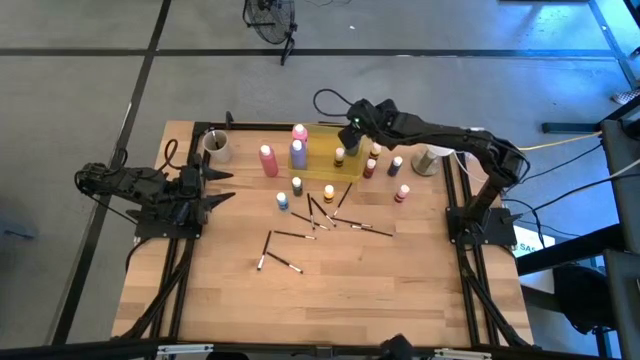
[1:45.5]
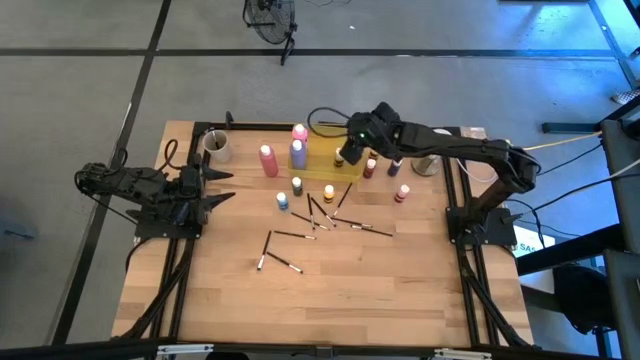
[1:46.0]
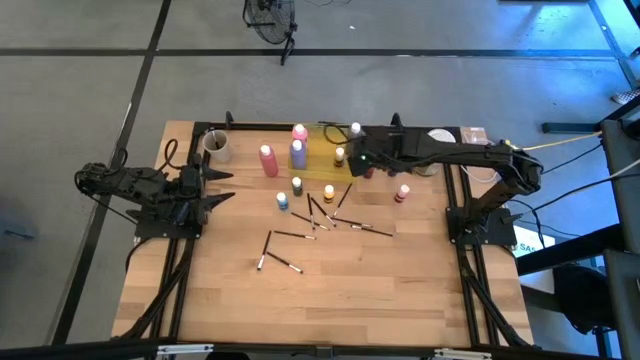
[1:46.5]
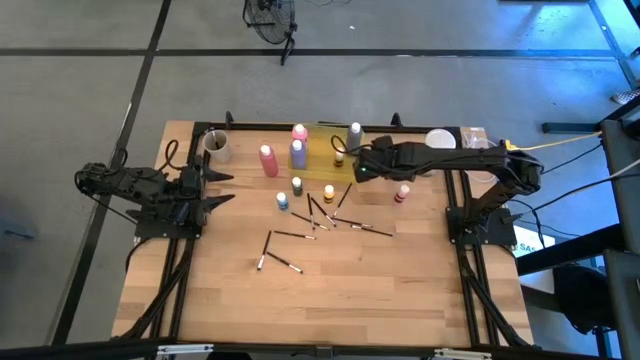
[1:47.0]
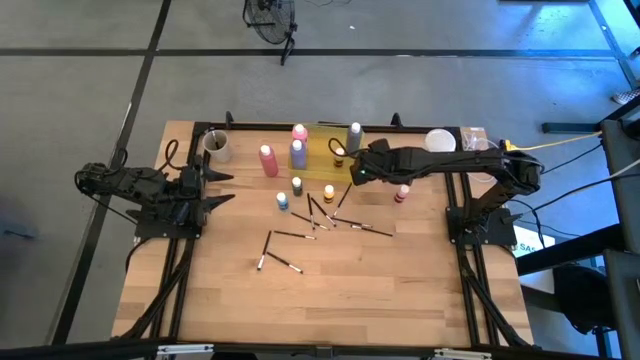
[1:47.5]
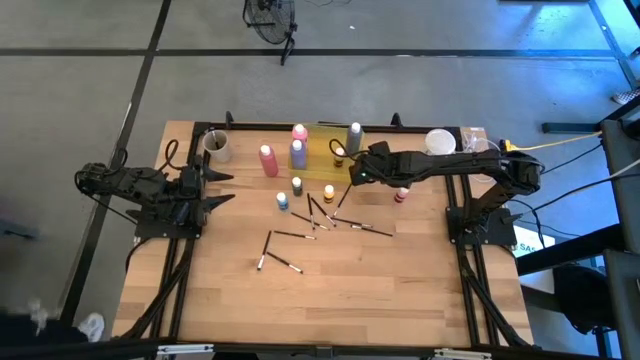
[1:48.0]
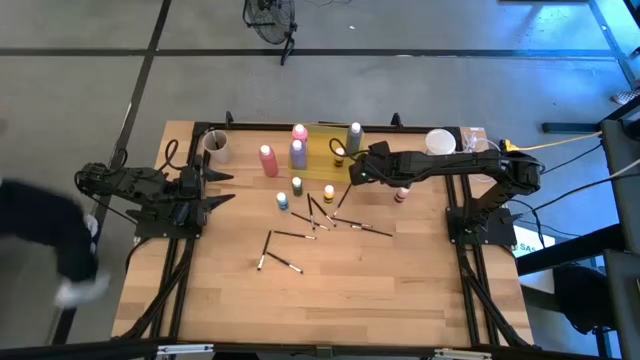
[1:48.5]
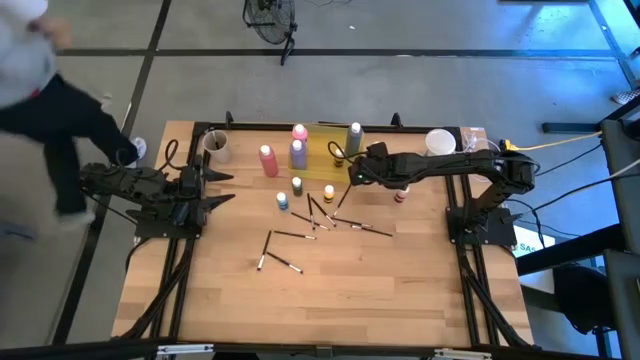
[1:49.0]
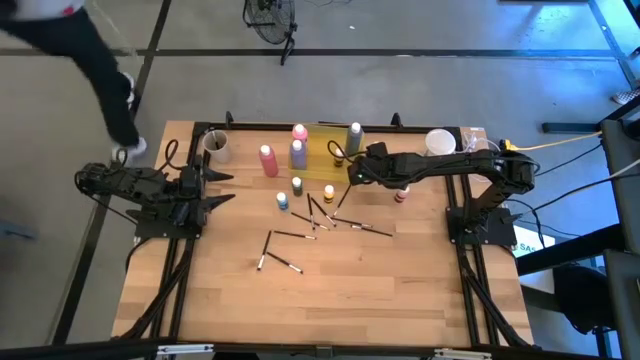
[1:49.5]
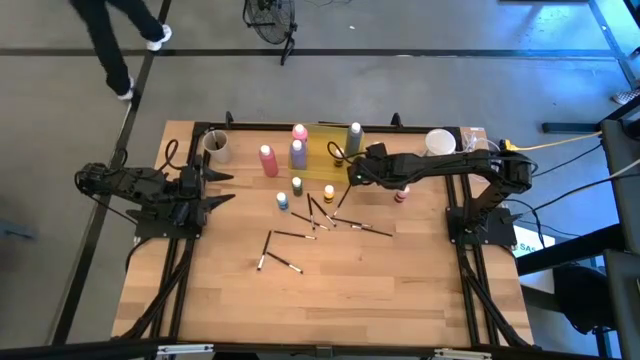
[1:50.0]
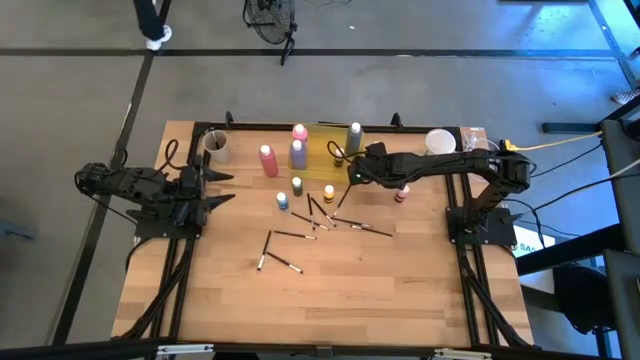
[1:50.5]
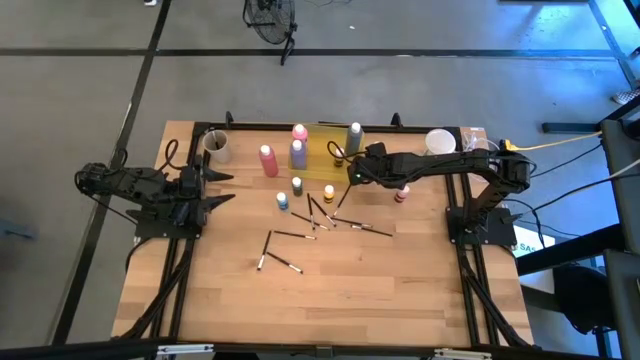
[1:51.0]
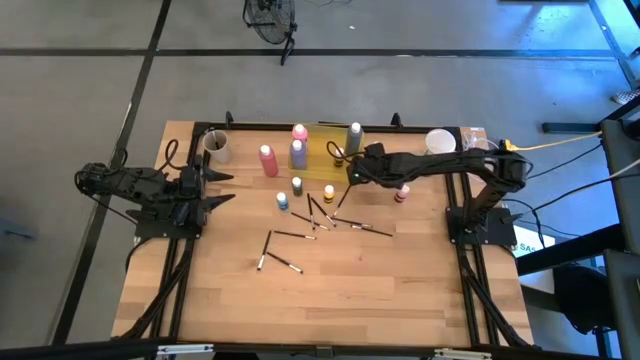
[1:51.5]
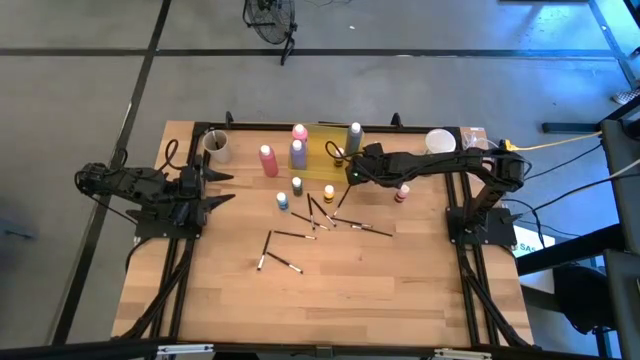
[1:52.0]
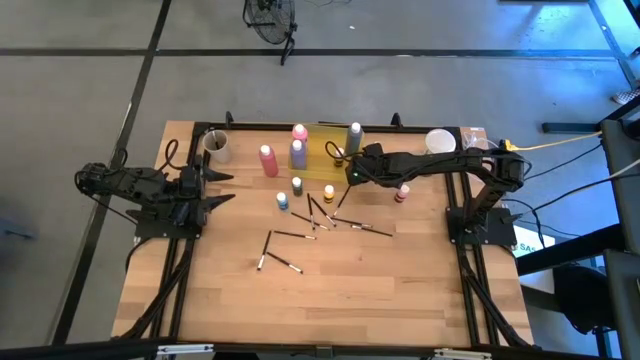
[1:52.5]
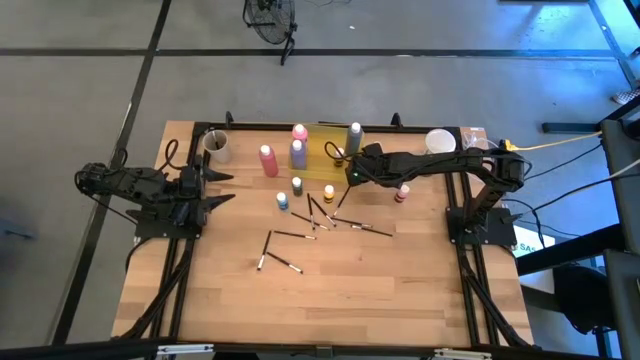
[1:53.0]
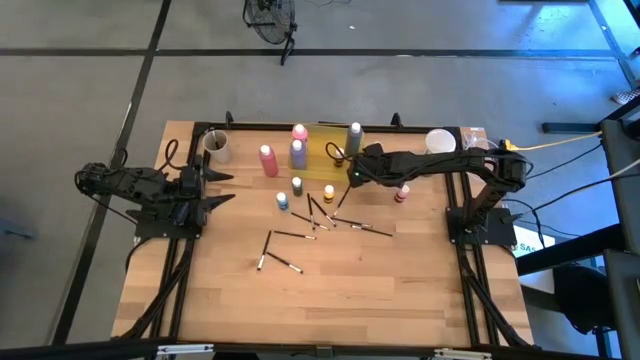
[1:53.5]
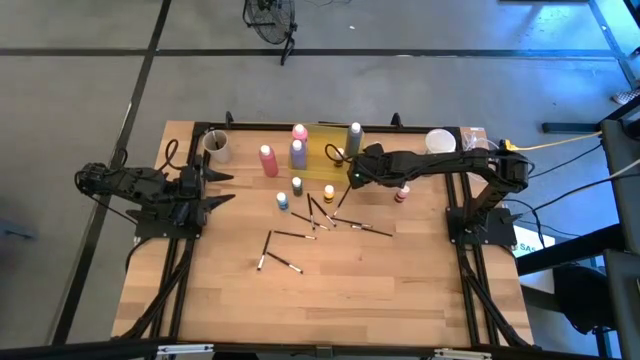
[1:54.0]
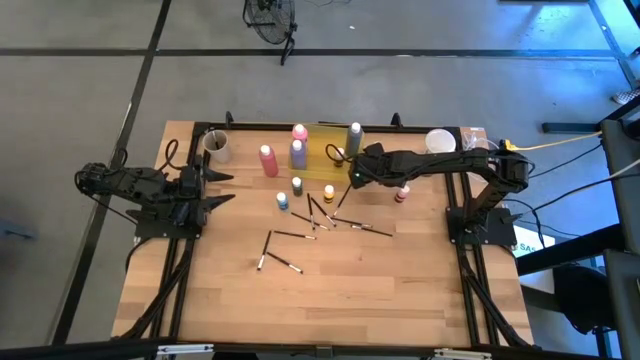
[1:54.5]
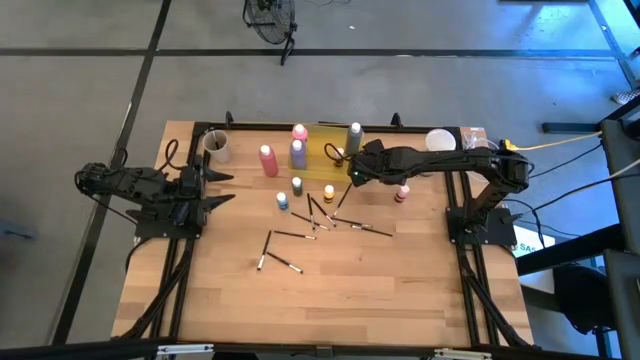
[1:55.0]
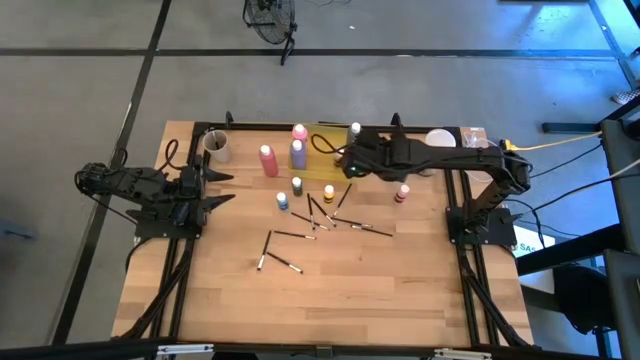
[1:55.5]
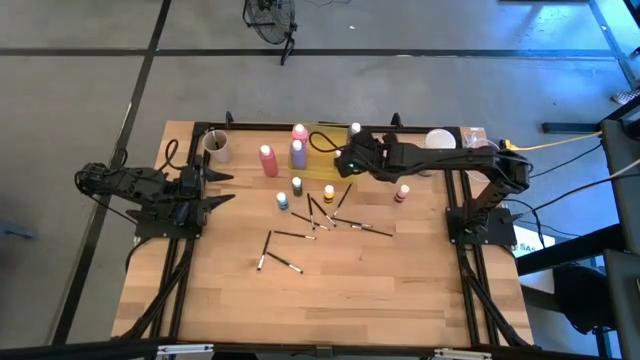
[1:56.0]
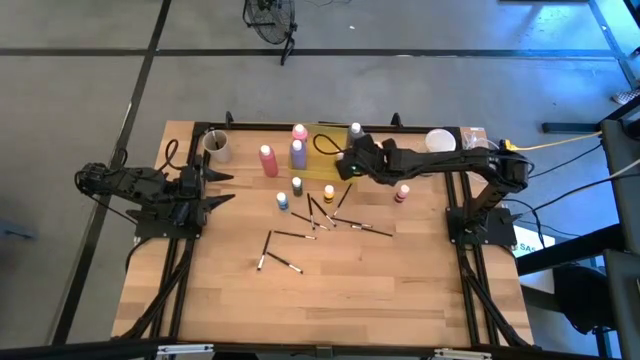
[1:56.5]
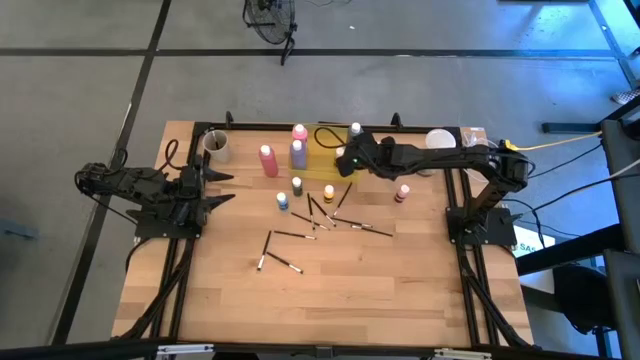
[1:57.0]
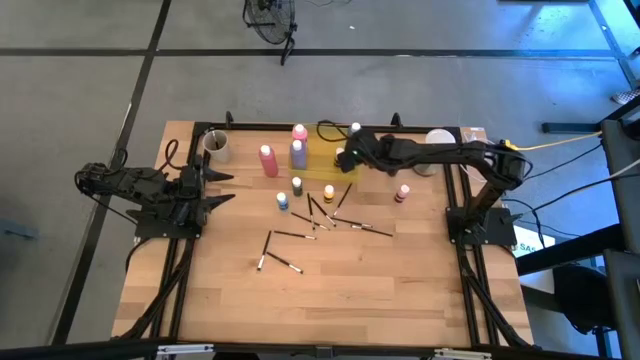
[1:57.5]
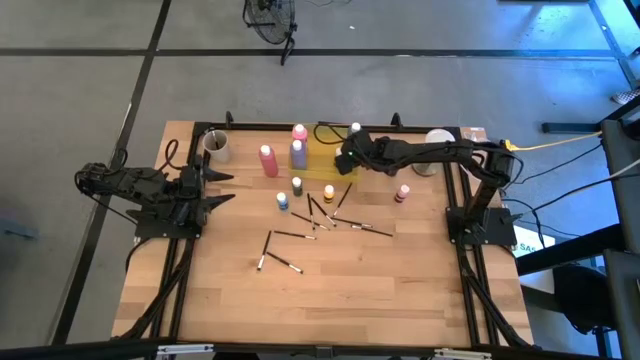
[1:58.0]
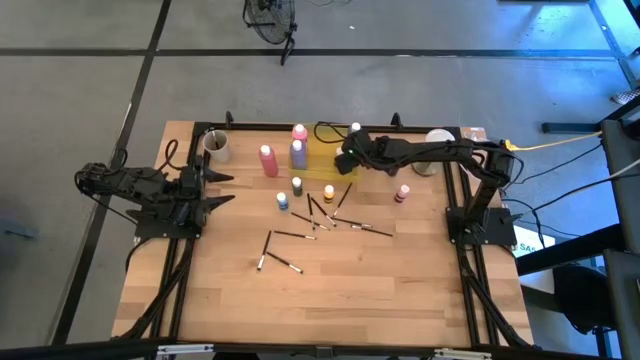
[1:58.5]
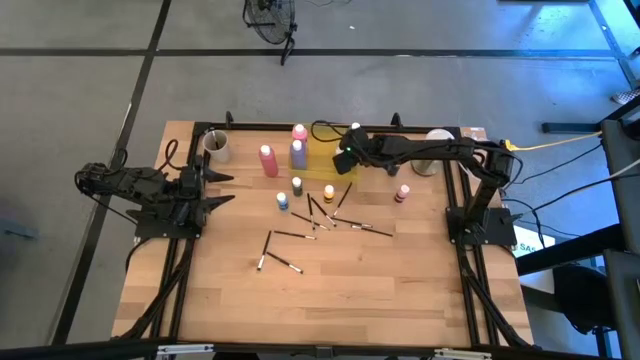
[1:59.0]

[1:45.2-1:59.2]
Task: Pick & Place Paint Supplies
Put the small red paint bottle into the yellow bin

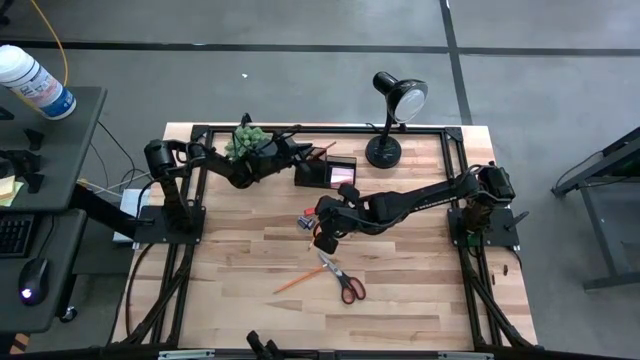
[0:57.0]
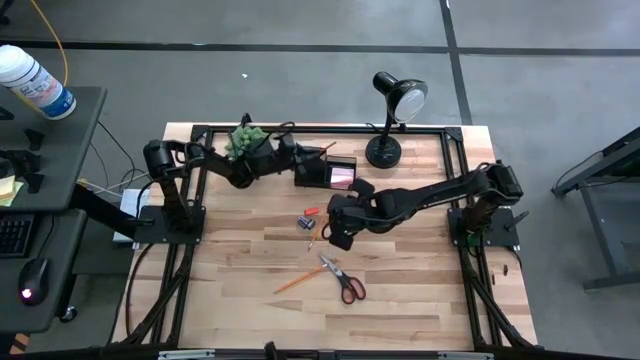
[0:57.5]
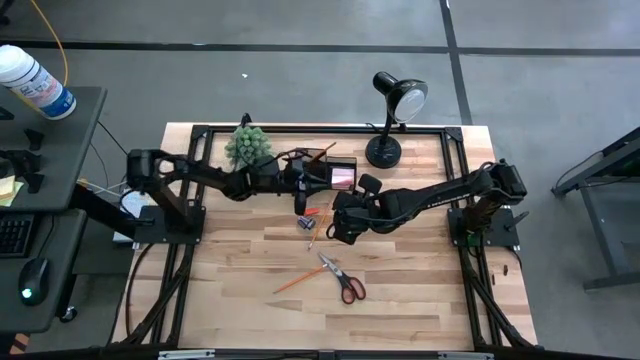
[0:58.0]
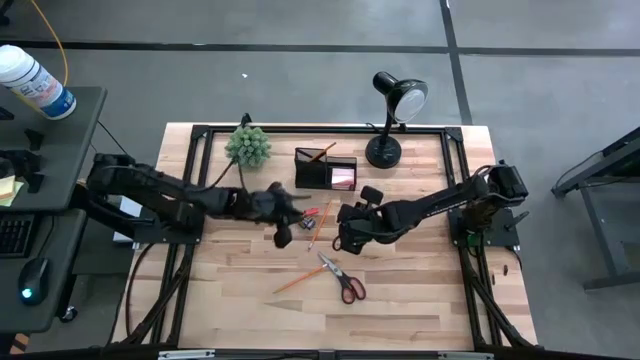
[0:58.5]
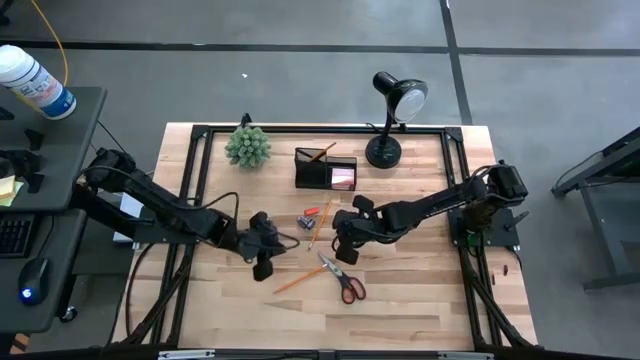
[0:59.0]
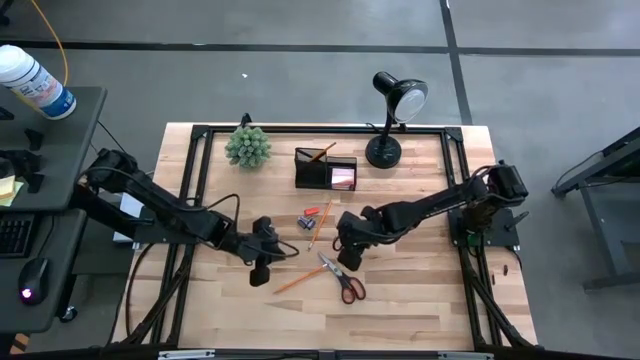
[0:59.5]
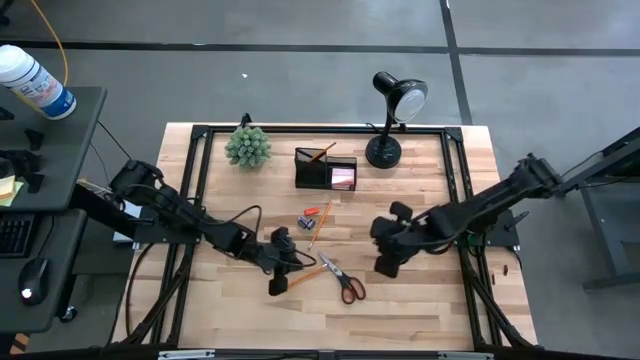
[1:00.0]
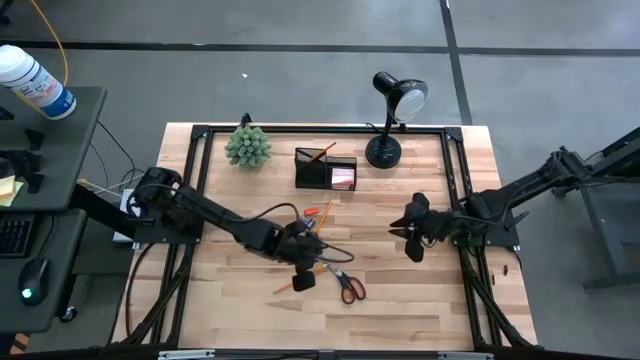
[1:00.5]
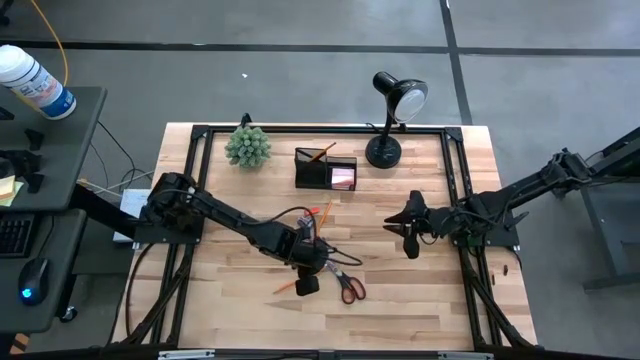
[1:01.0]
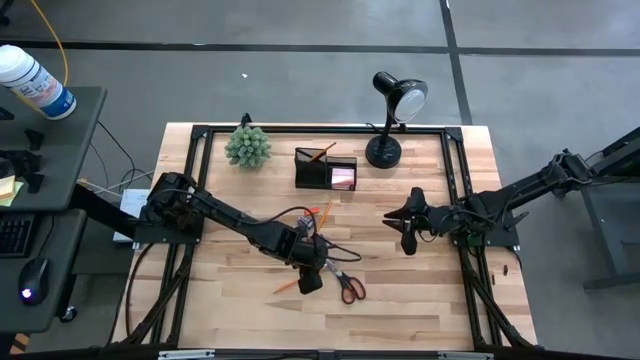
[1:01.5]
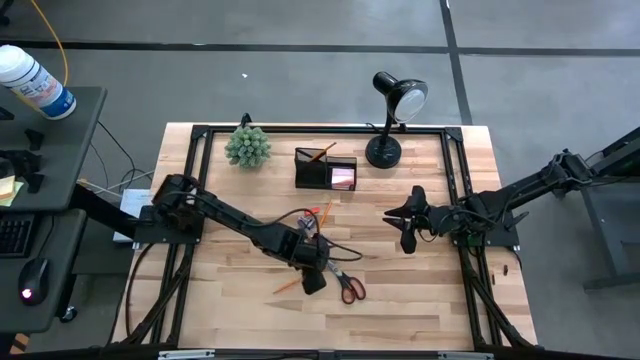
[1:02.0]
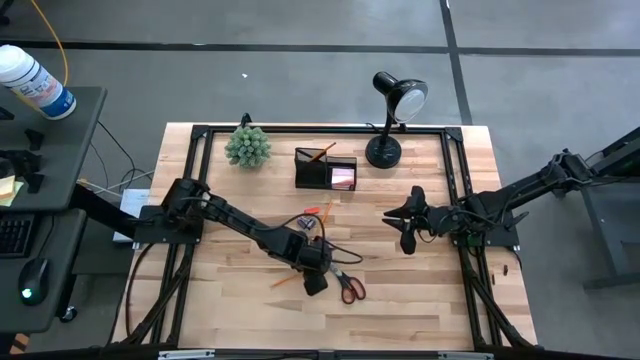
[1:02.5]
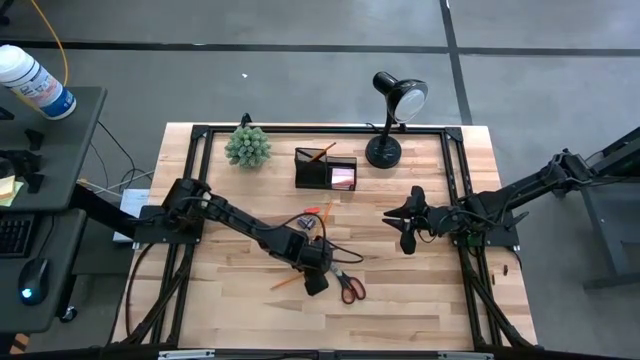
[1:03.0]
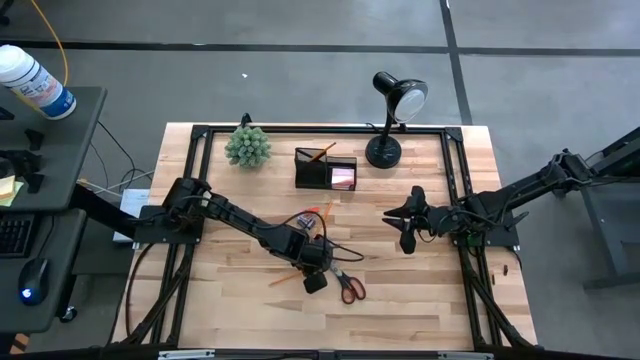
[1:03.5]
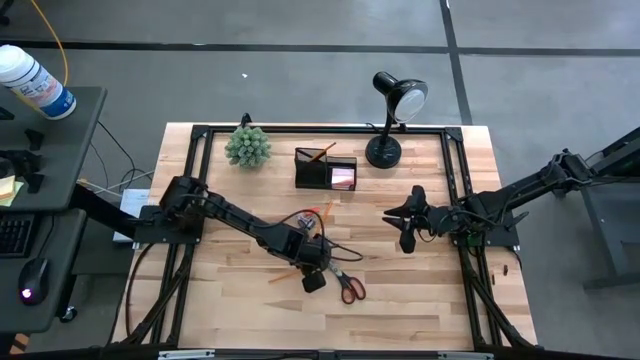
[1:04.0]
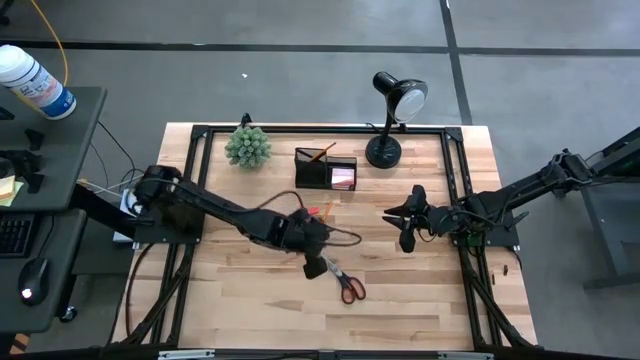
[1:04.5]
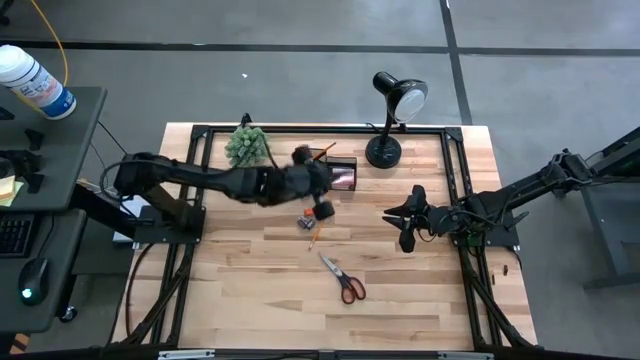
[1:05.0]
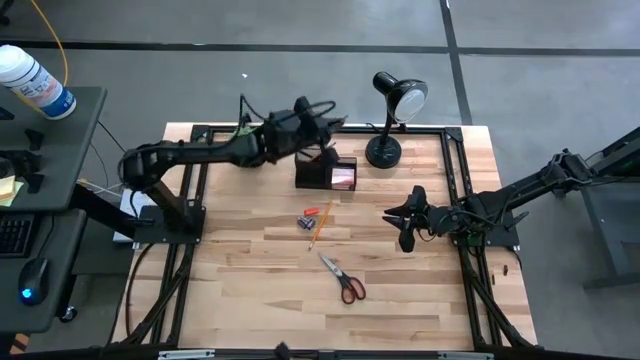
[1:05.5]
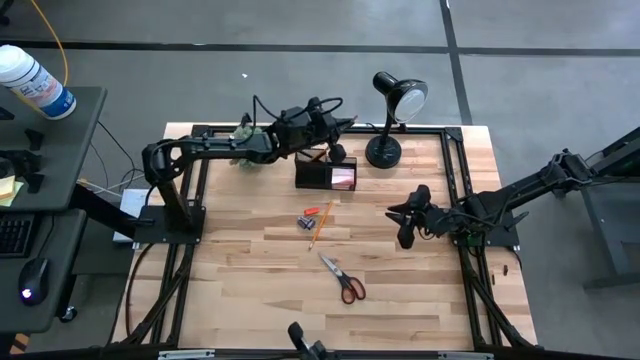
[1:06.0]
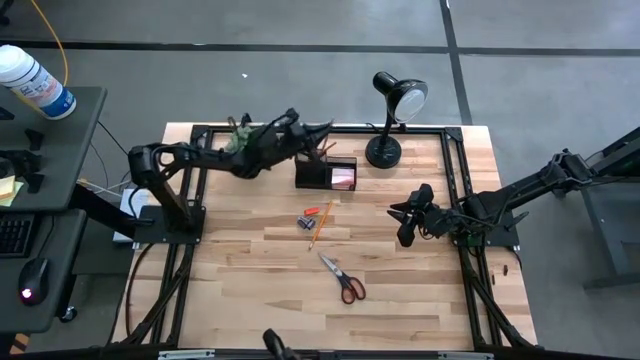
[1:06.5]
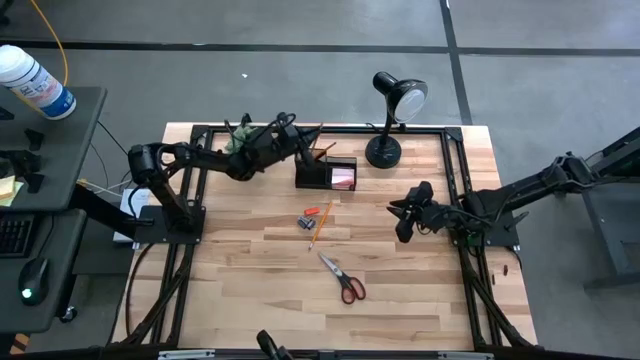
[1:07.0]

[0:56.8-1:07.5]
Task: Pick and place office supplies into organizer
Put the bottom pencil into the desk organizer
